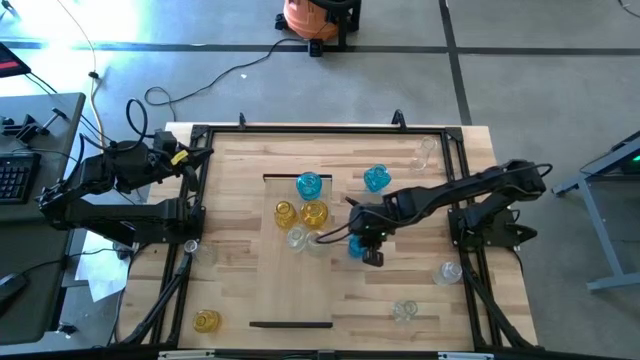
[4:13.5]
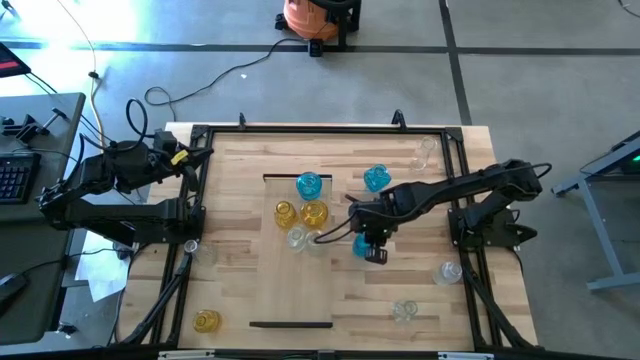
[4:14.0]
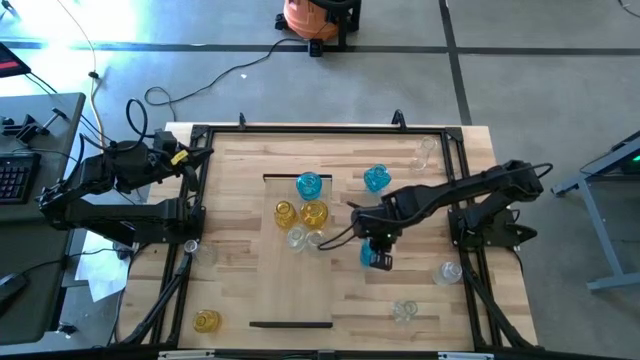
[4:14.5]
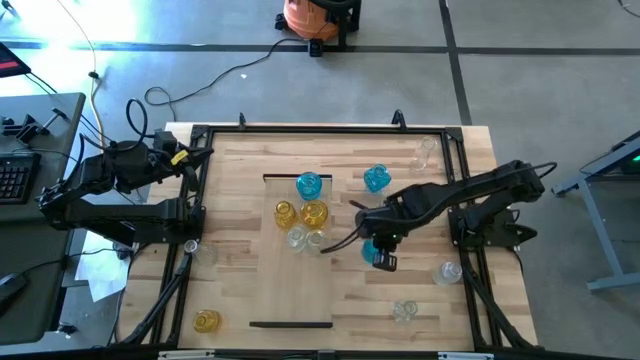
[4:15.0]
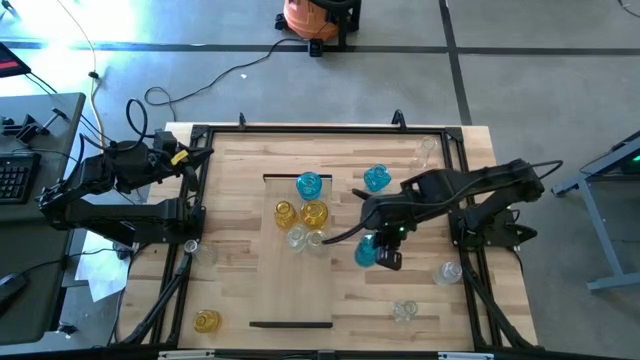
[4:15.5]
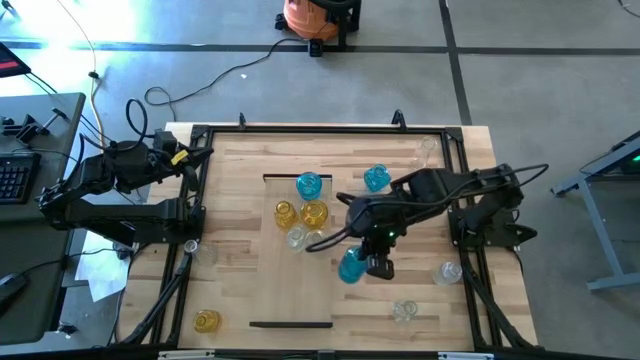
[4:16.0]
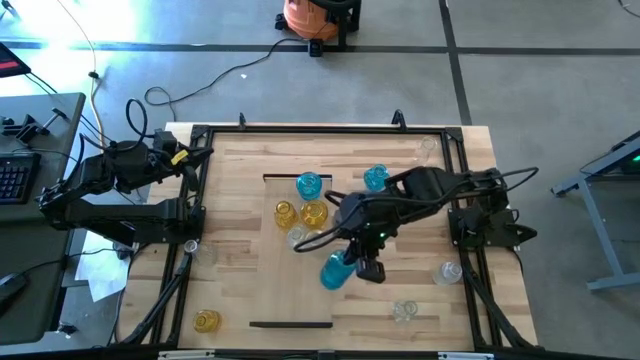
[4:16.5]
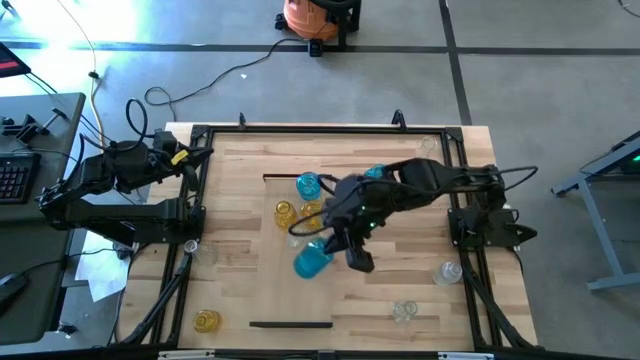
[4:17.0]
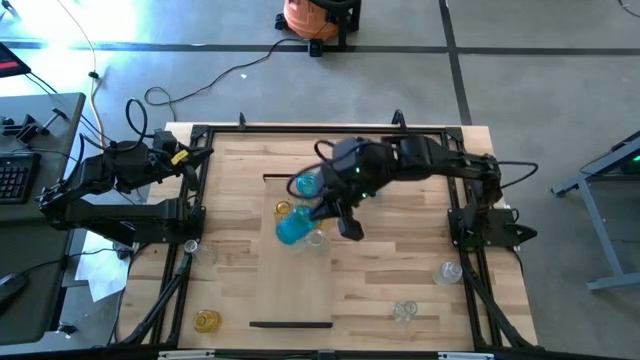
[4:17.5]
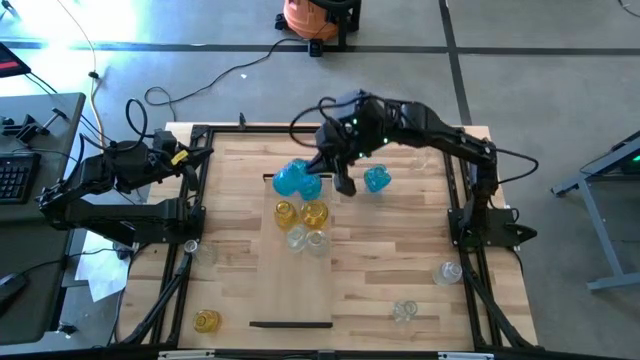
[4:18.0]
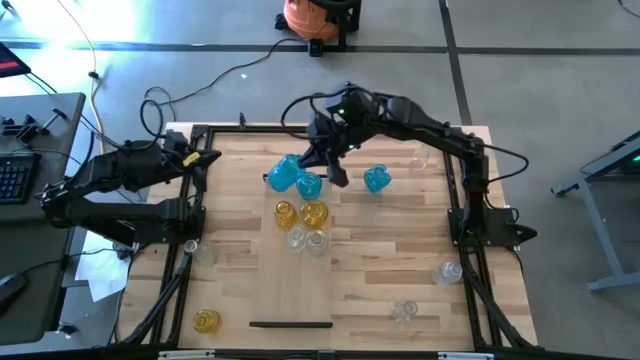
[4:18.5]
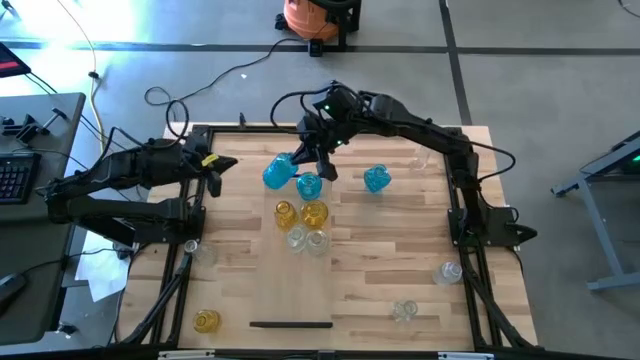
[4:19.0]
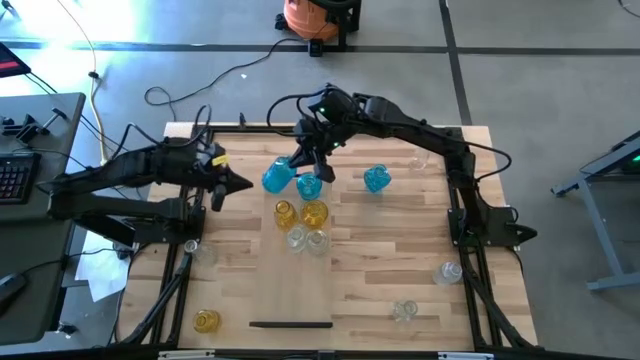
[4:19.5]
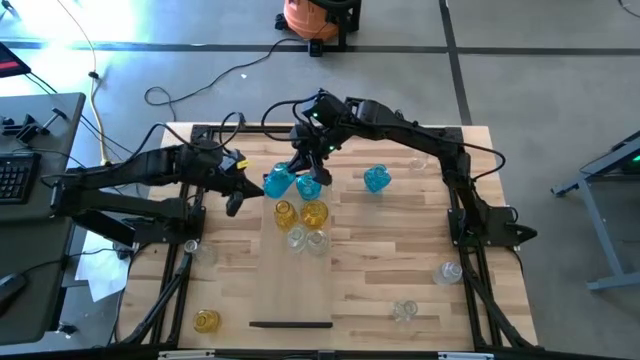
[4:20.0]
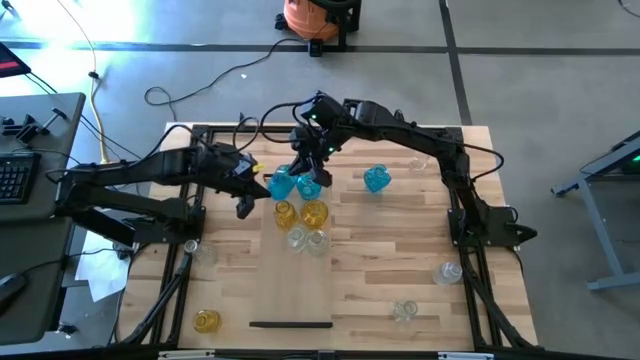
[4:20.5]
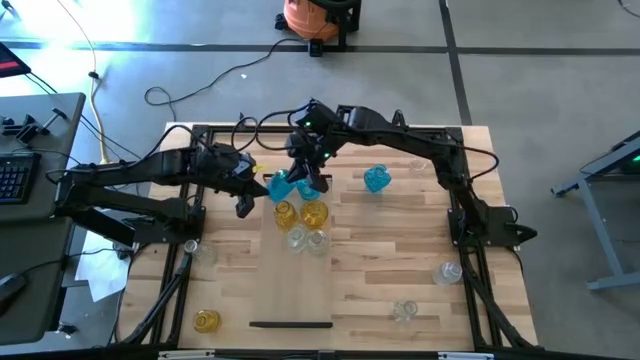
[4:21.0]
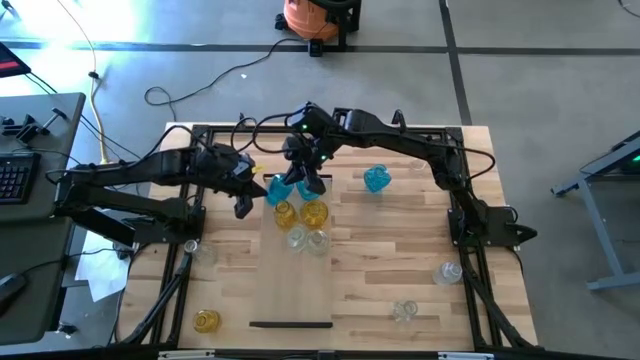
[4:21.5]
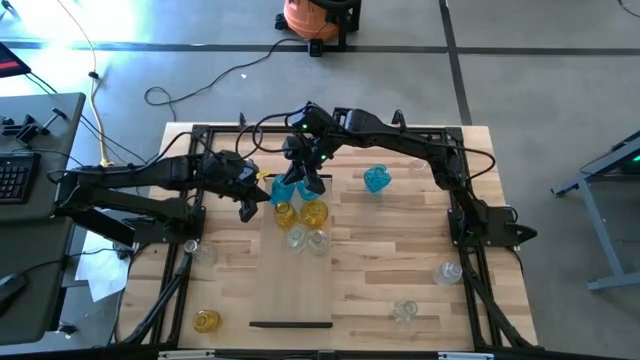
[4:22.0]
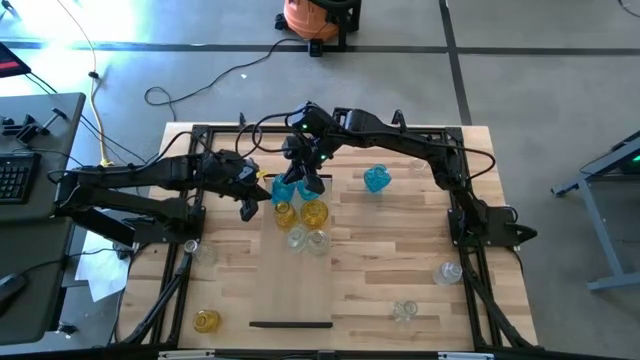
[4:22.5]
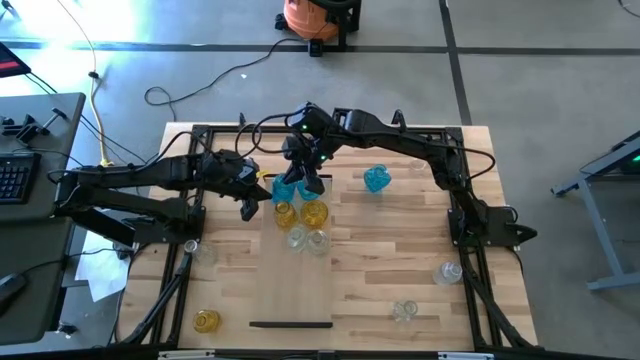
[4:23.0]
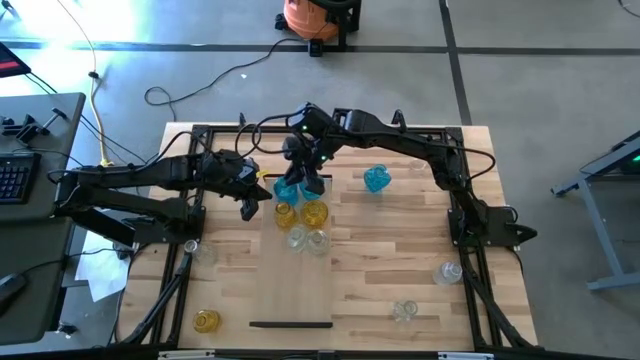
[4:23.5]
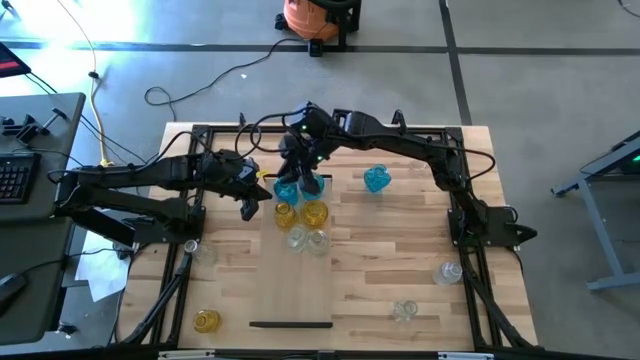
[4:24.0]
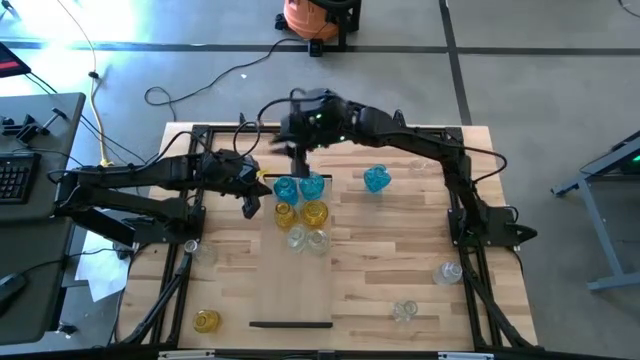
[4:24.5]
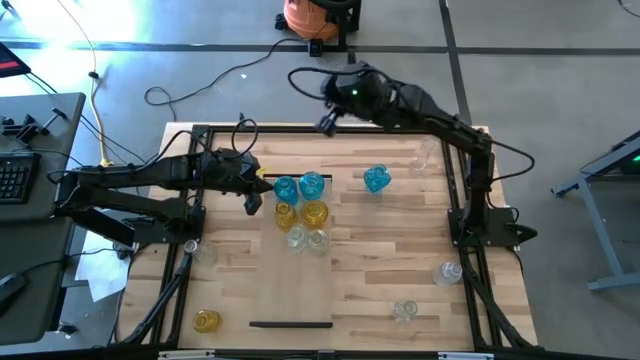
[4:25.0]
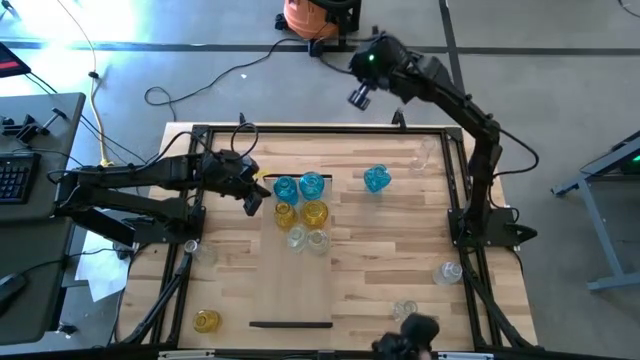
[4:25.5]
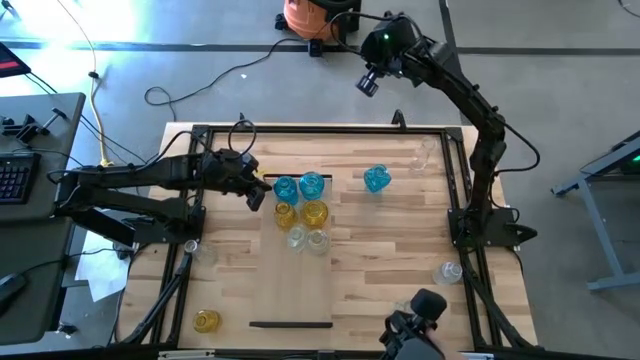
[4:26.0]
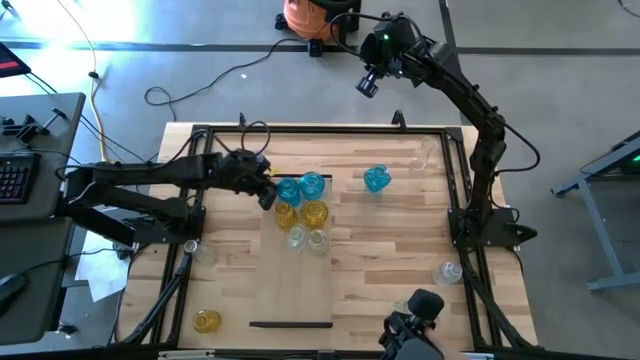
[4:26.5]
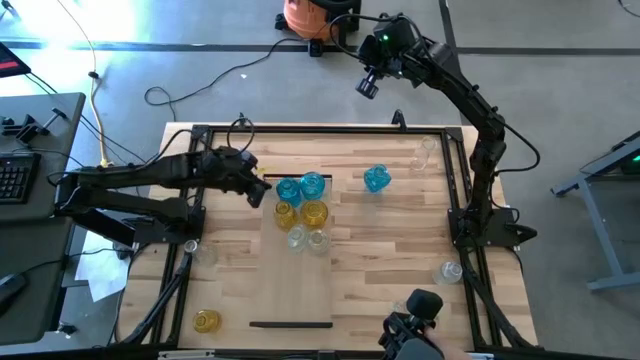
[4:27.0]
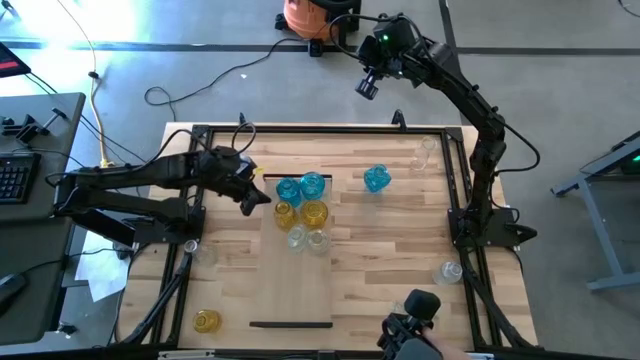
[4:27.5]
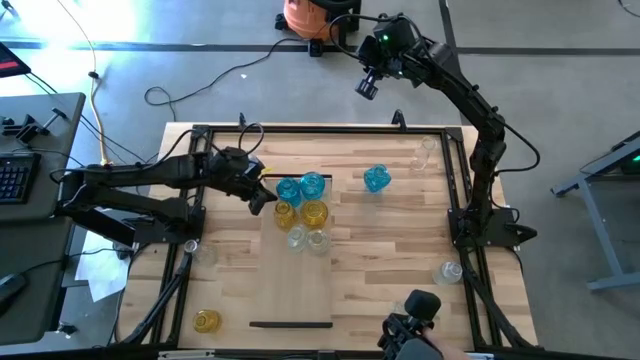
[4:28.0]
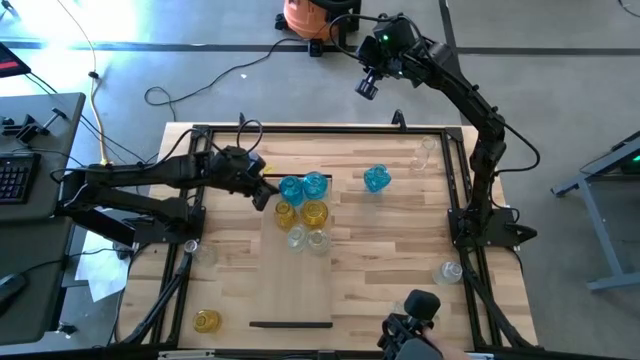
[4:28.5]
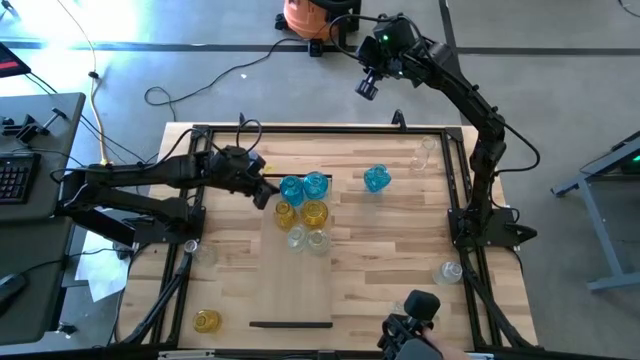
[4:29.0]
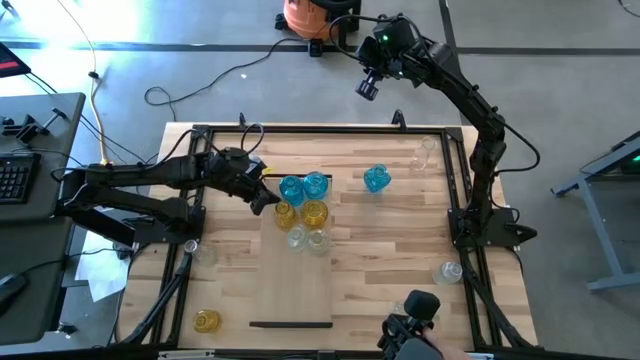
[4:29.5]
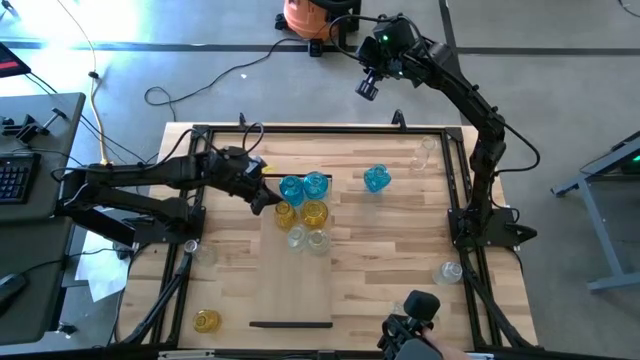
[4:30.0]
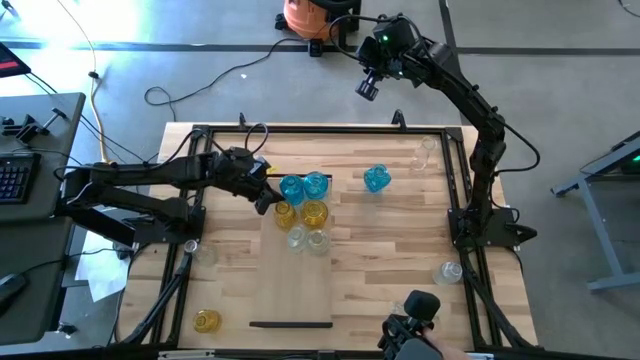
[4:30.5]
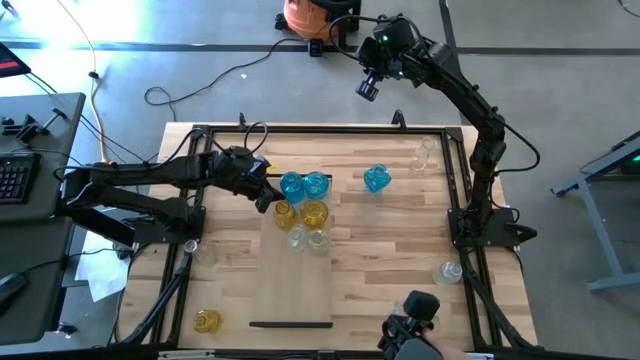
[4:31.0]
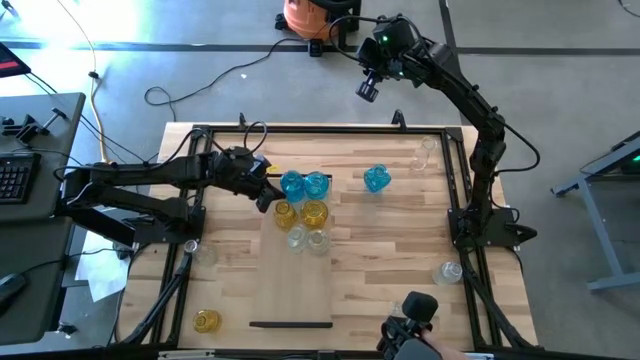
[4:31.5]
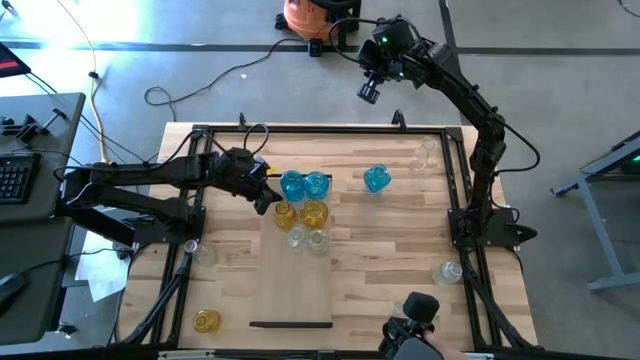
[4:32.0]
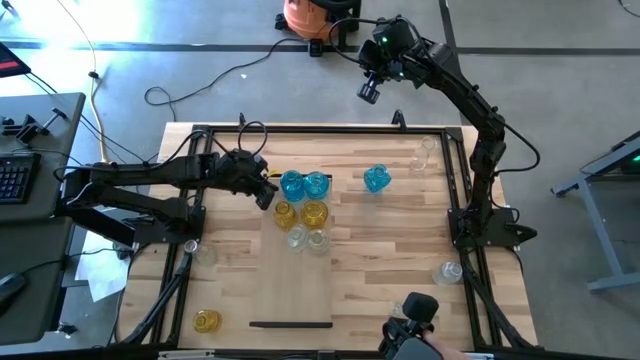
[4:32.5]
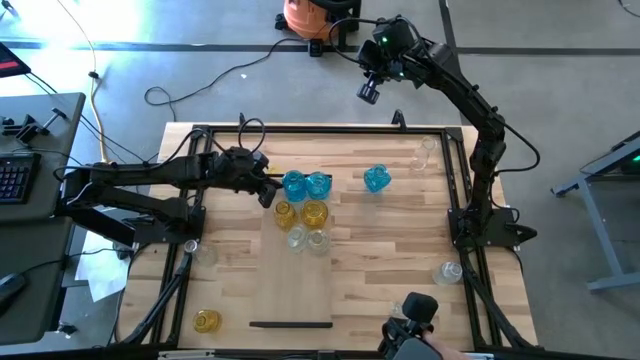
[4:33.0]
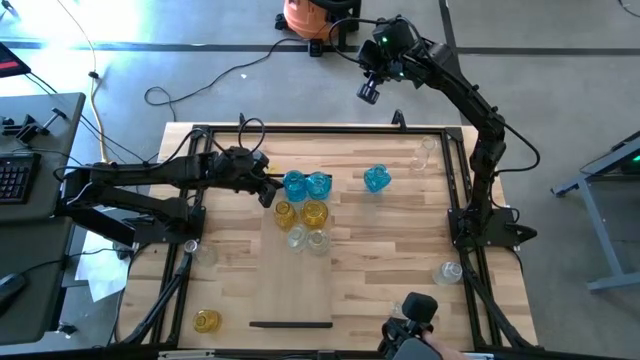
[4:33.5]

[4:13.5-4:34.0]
Task: sort vases onto shelf
Put the bottom blue vase on the shelf to align with the other blue vase

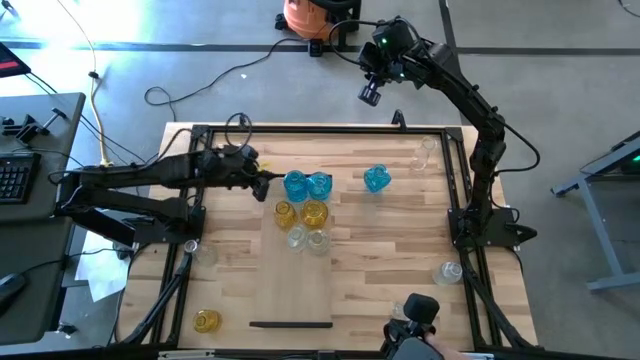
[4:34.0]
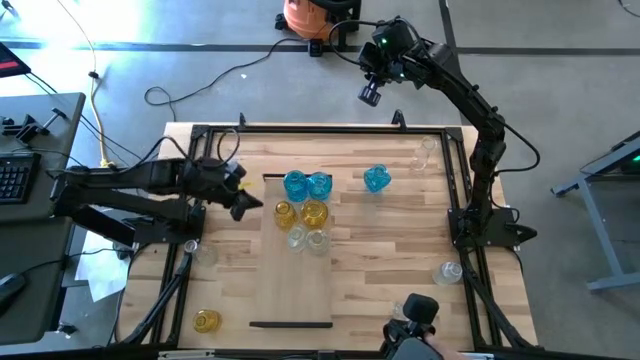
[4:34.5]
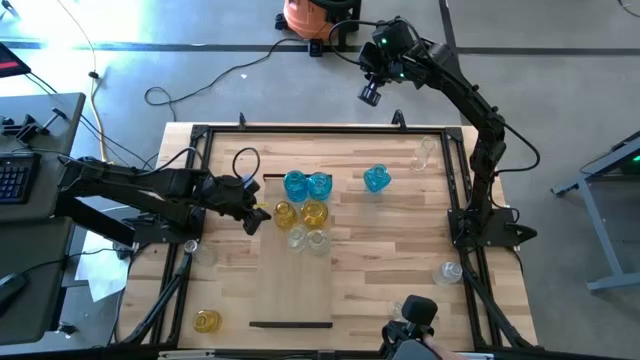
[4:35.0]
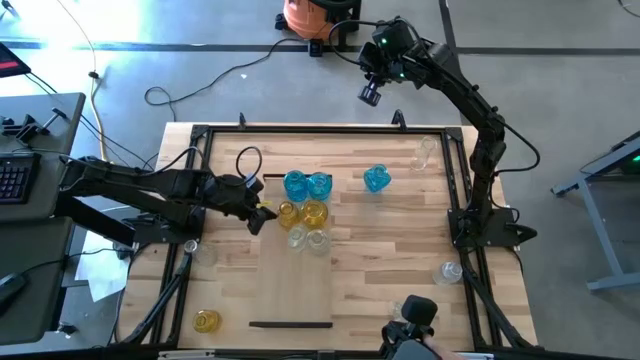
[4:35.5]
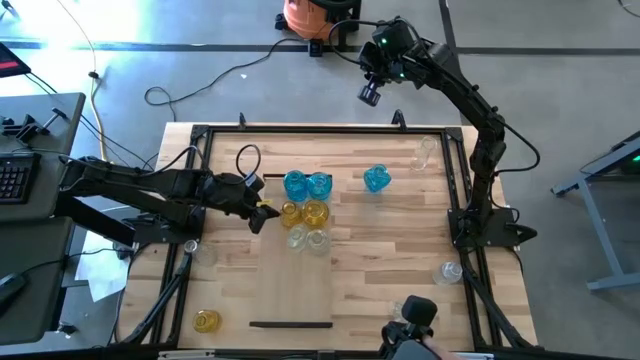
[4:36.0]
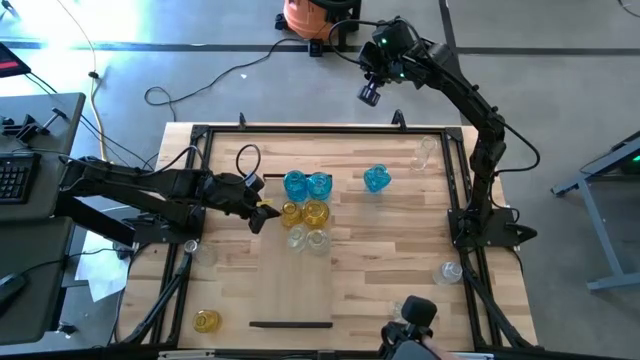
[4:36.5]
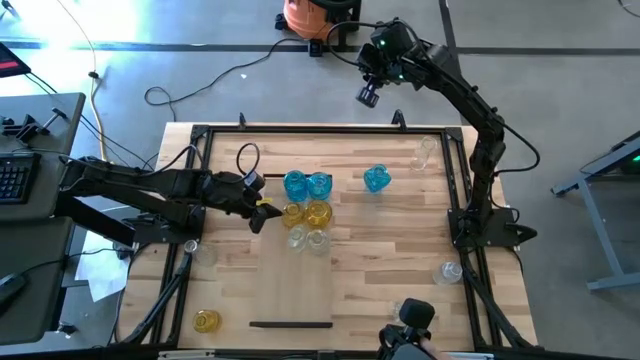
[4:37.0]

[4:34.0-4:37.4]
Adjust the yellow vase on the shelf
